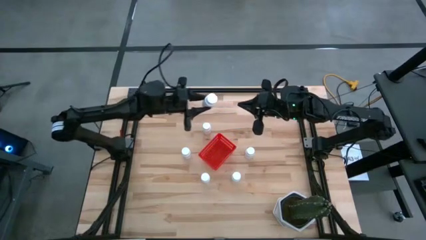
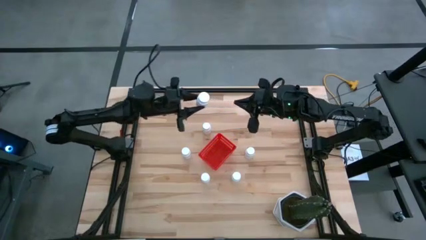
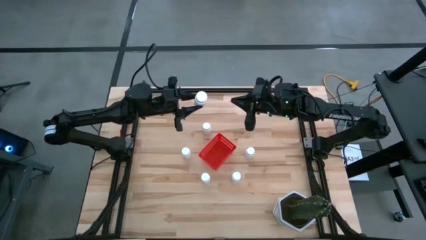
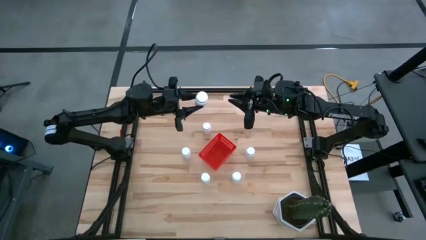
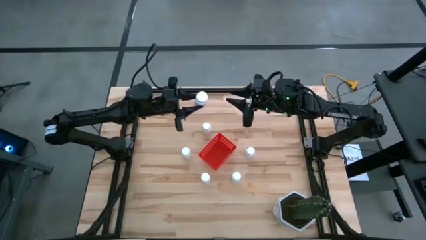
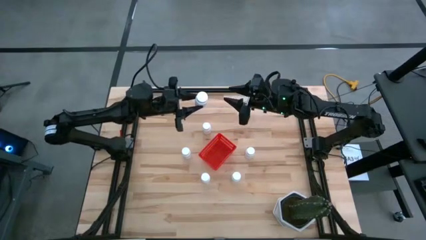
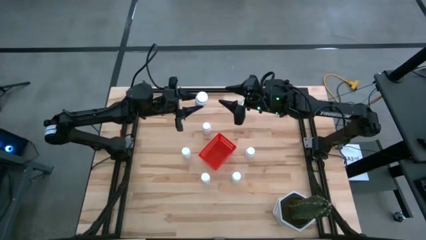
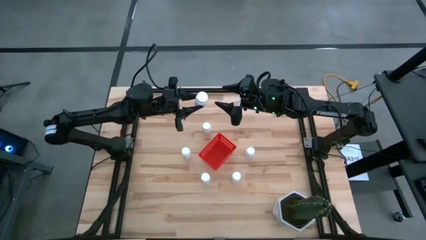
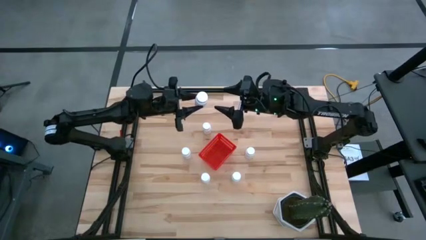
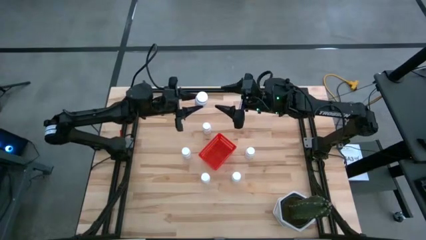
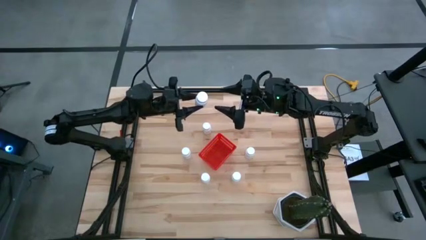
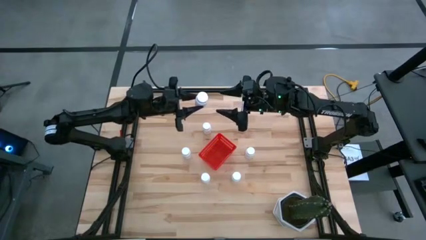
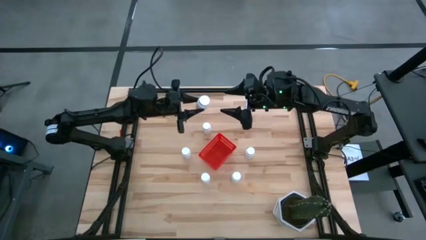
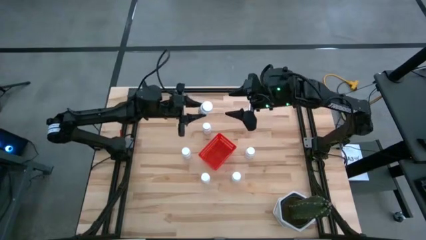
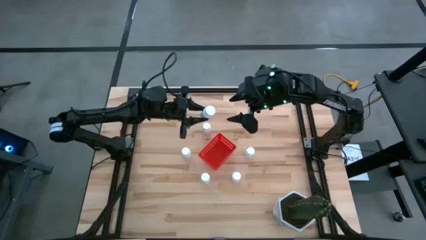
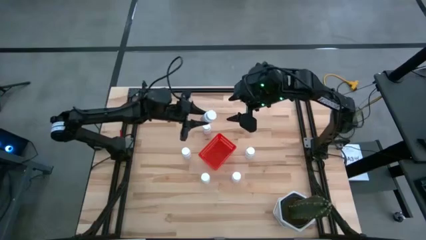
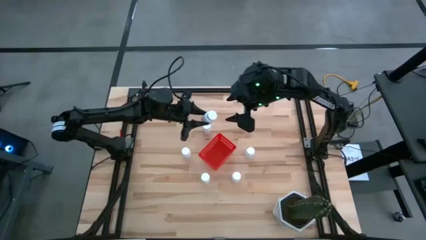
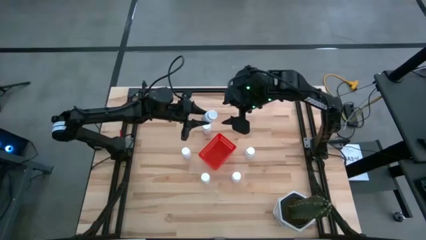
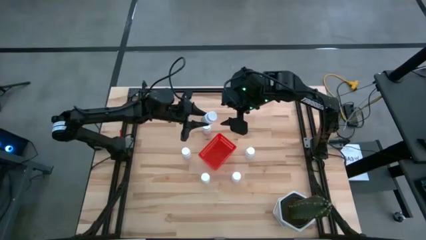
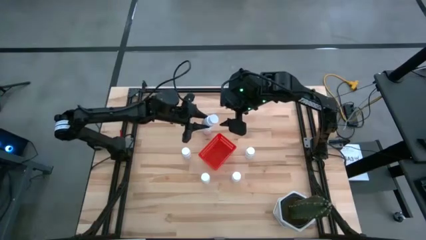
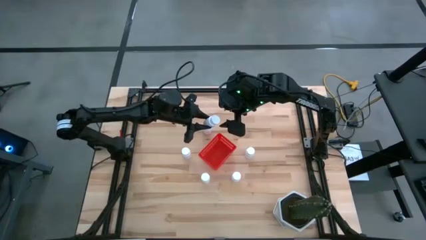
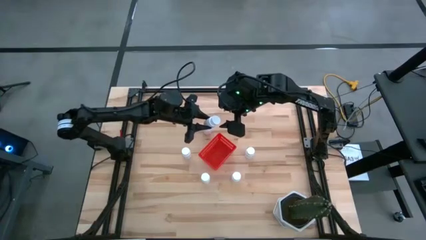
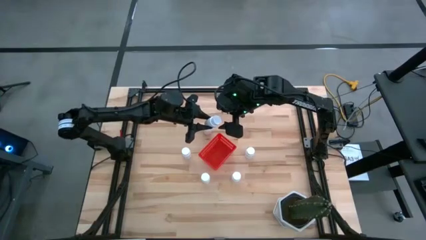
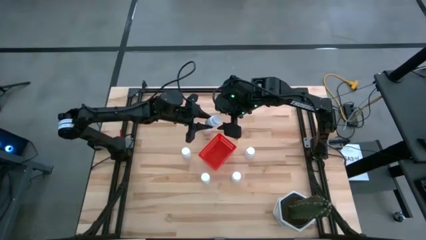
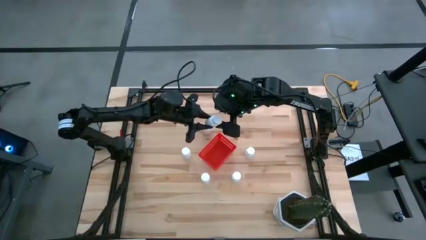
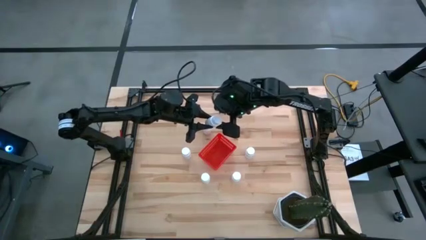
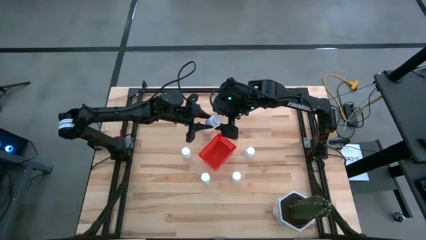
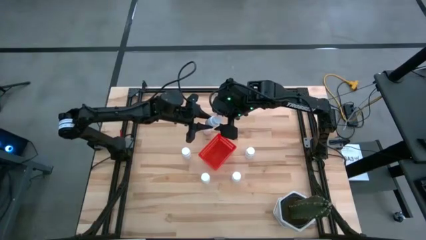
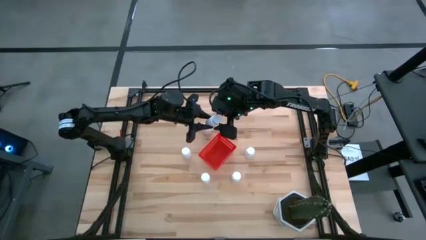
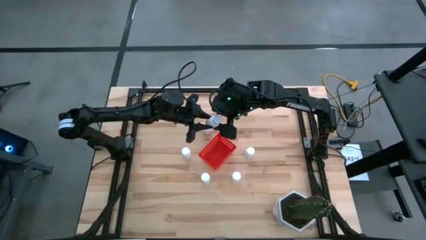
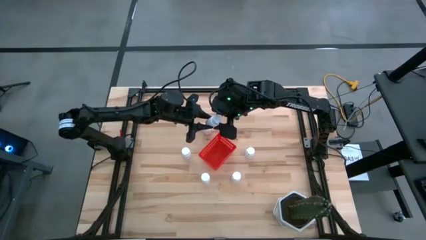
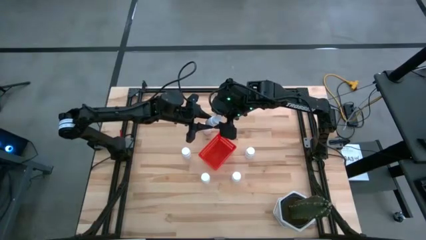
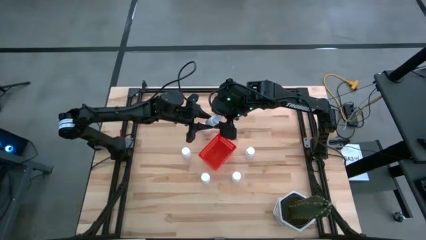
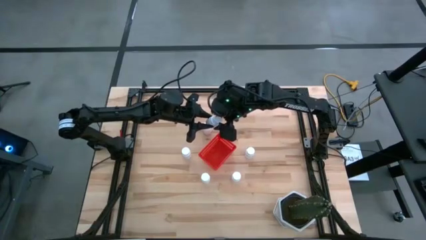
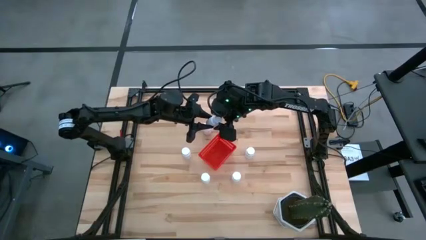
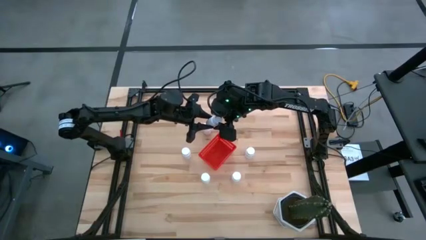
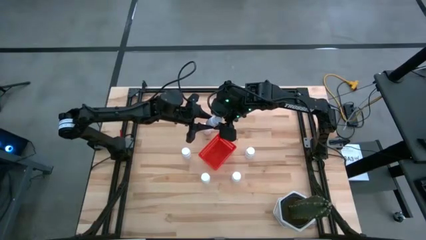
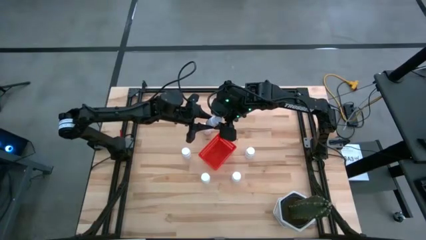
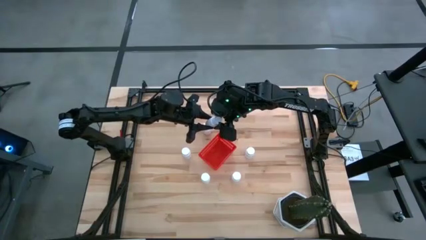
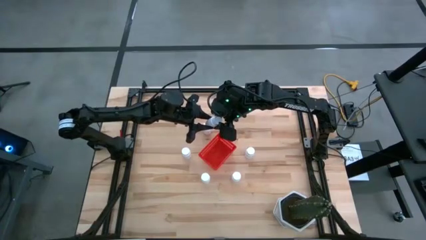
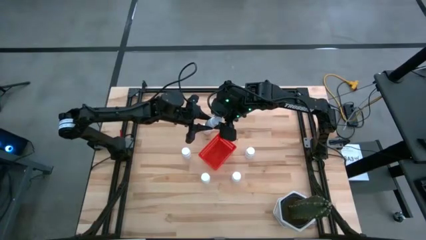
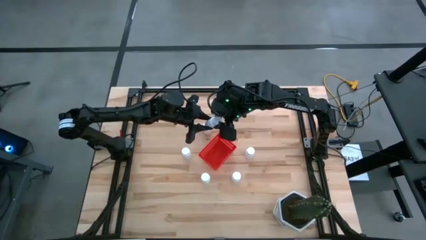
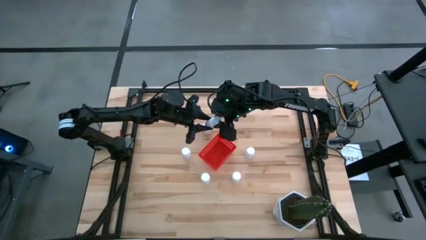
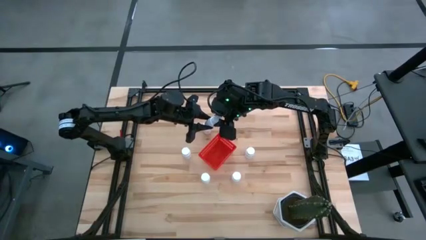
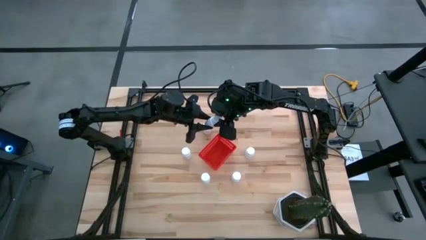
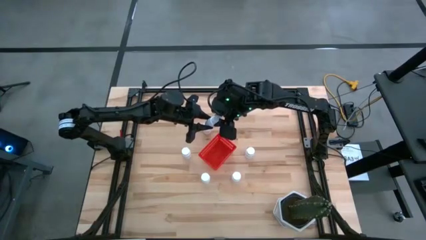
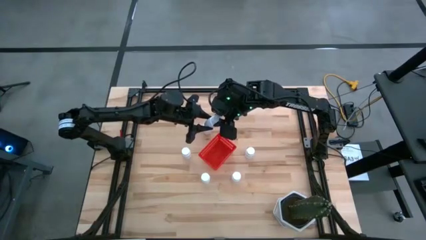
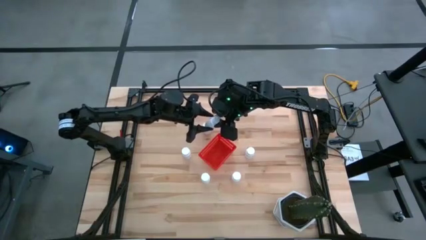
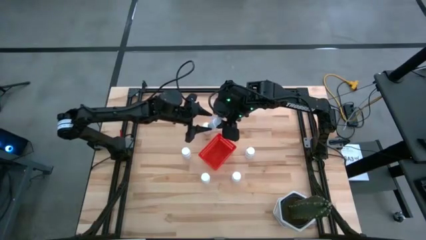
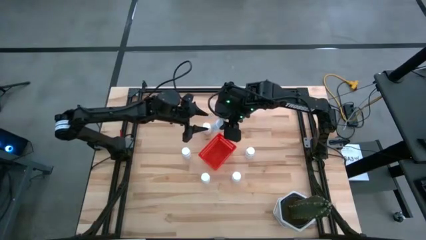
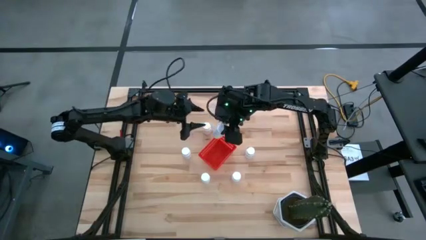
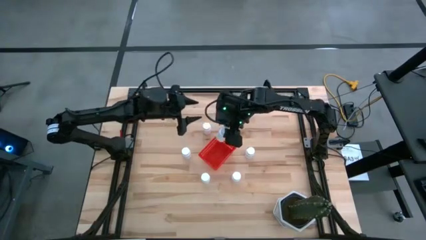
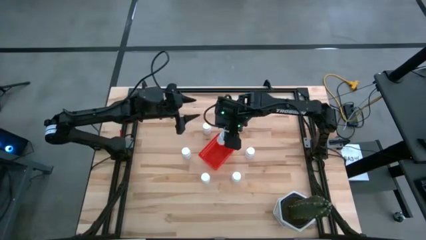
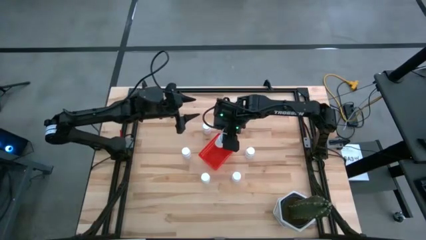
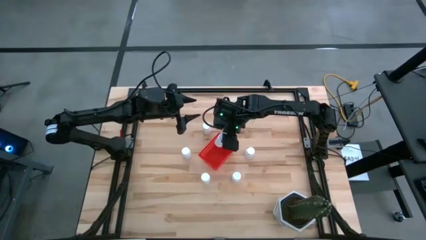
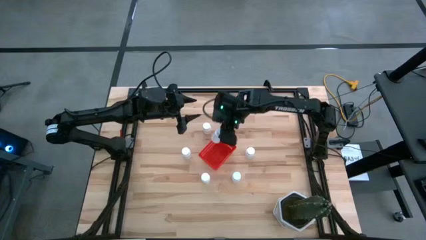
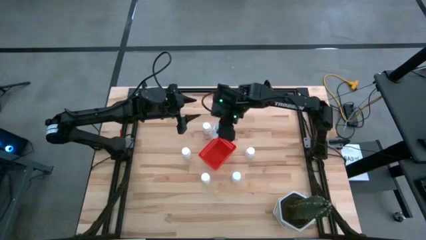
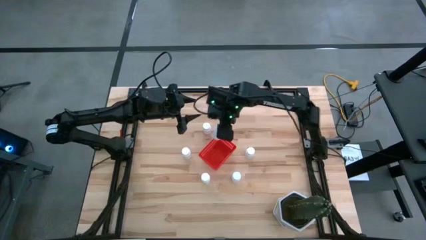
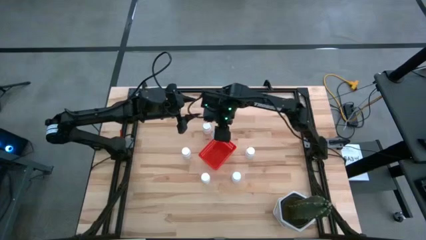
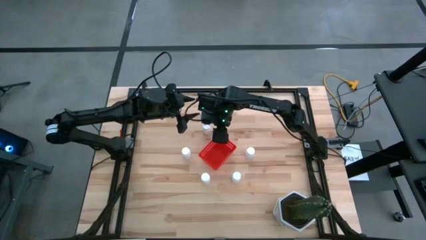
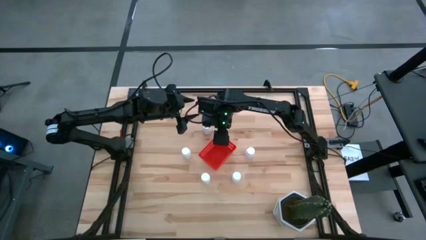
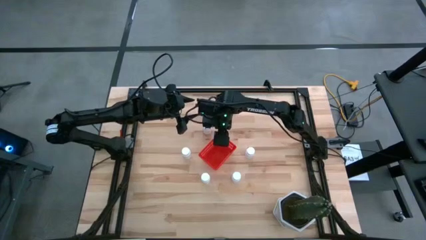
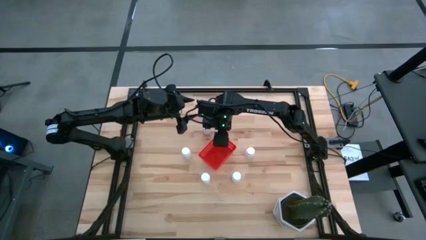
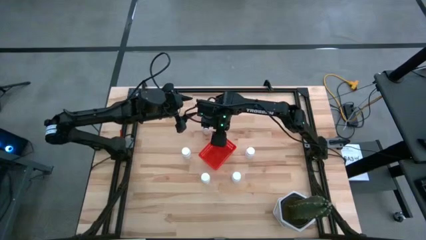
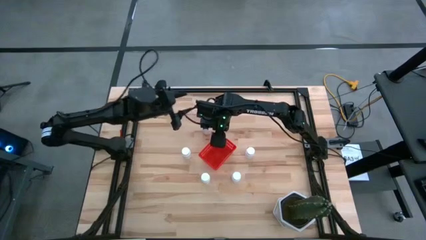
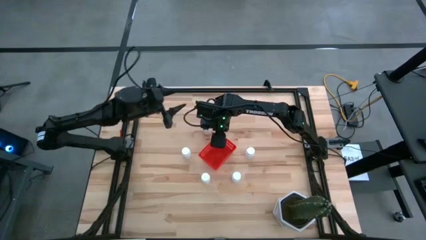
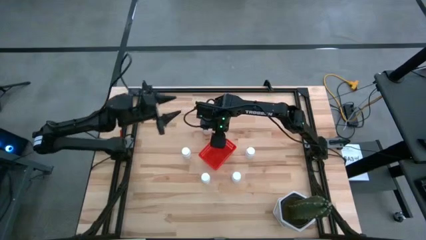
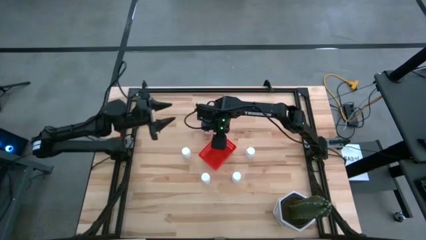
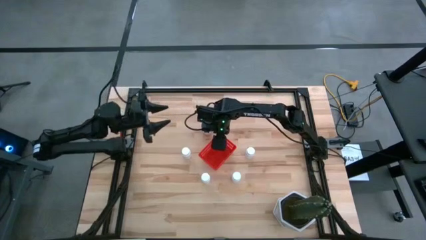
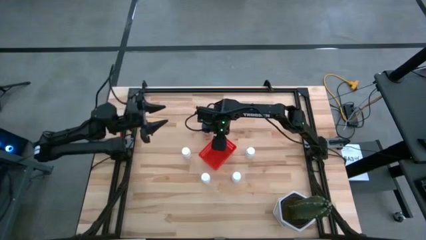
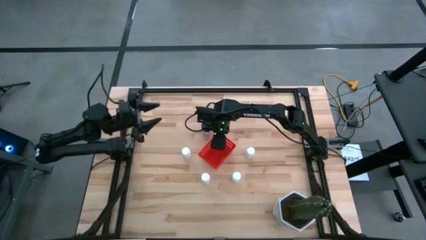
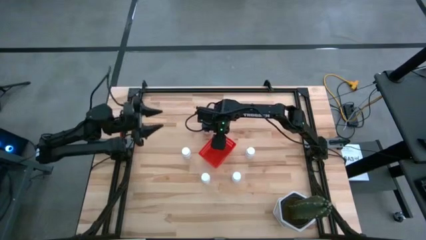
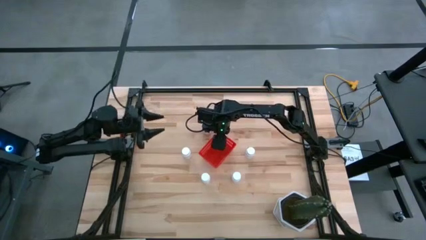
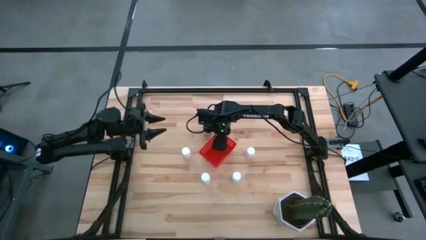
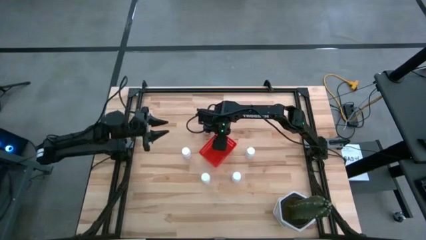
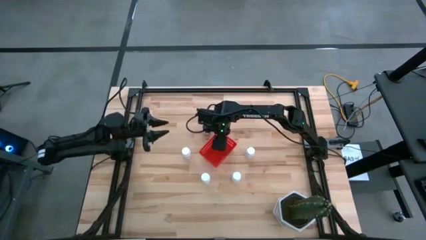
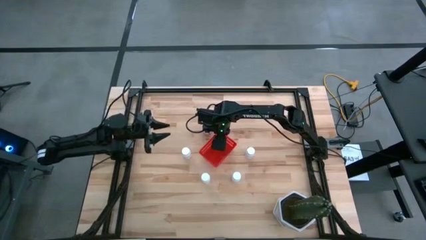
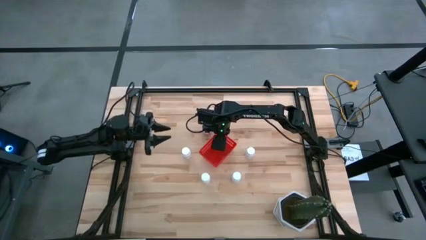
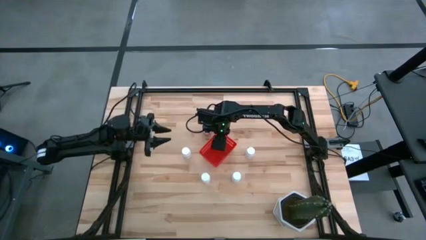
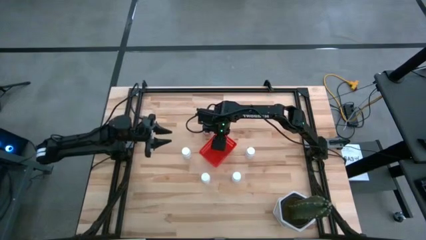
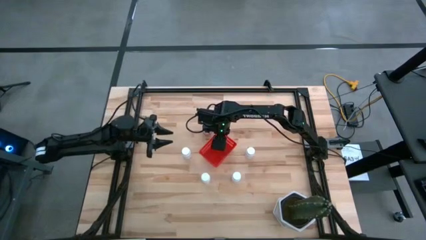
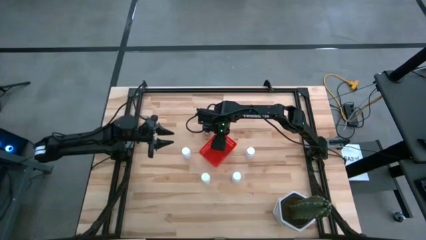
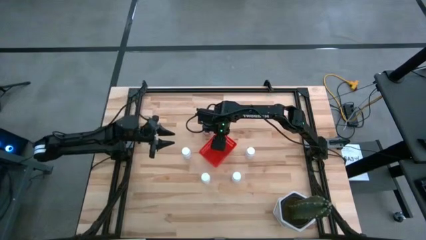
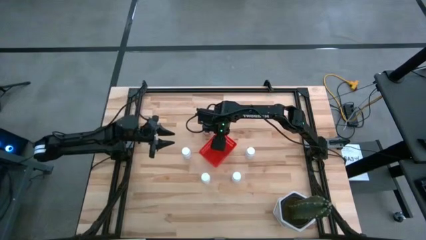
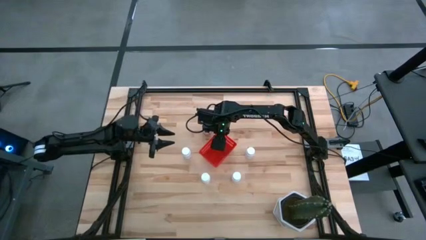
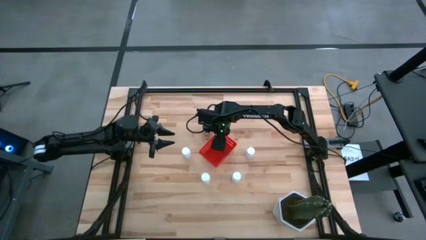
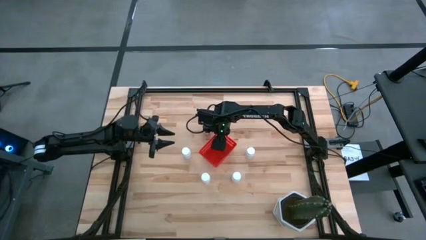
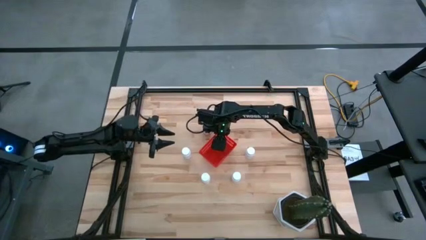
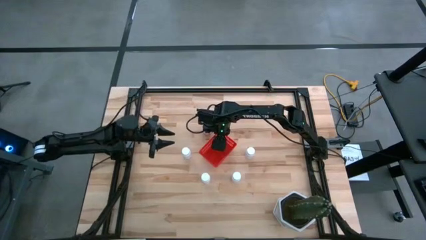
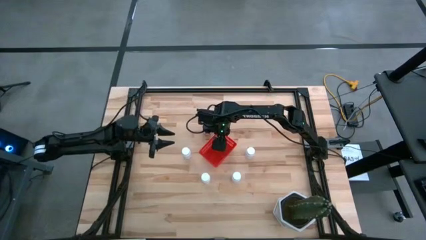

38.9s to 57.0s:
Task: Pick and place pill bottles into a basket
Put the white pill bottle into the red basket
